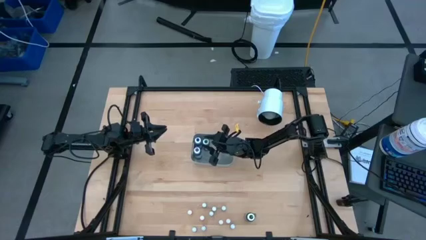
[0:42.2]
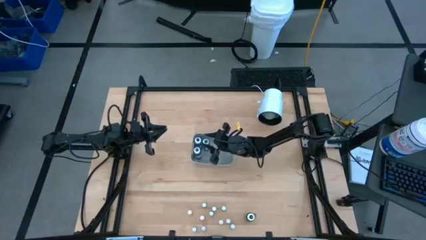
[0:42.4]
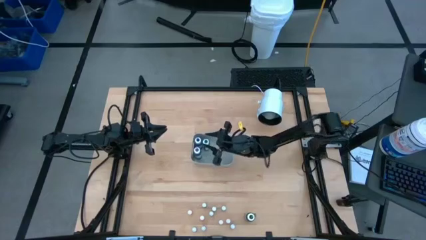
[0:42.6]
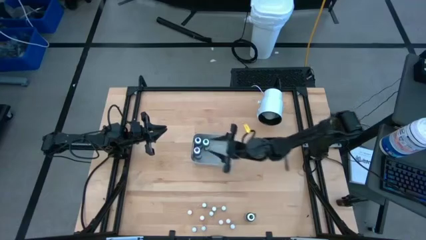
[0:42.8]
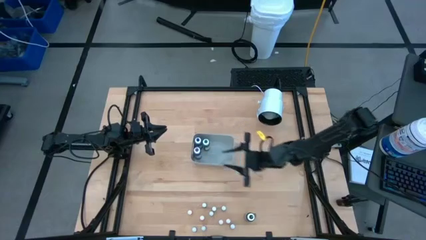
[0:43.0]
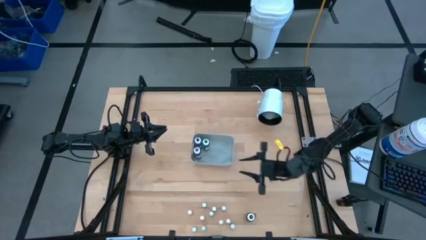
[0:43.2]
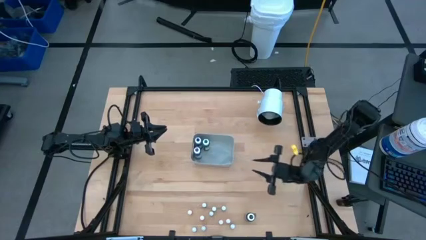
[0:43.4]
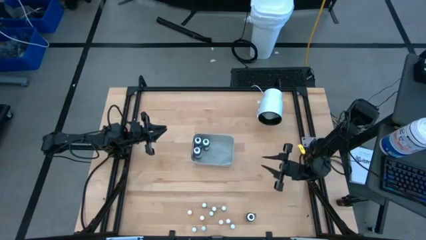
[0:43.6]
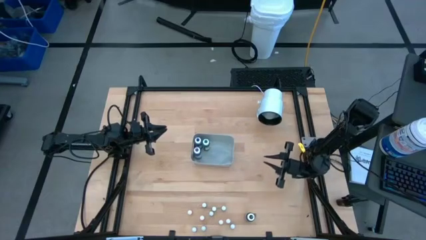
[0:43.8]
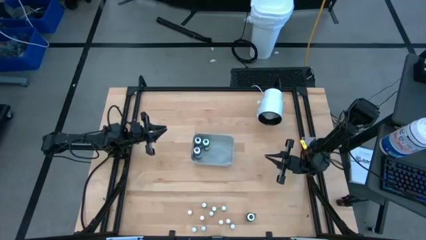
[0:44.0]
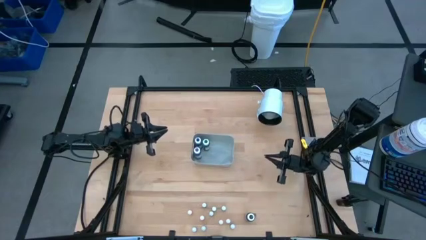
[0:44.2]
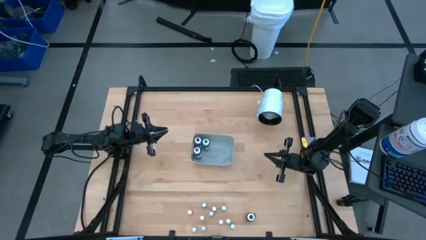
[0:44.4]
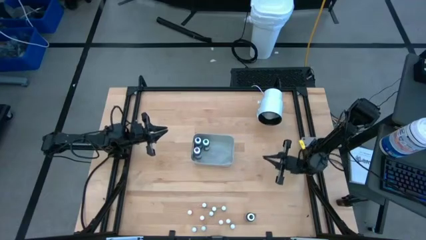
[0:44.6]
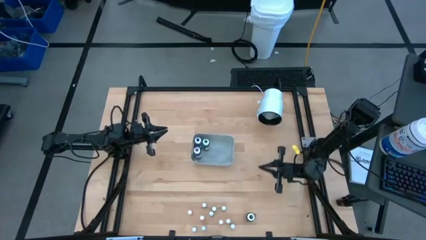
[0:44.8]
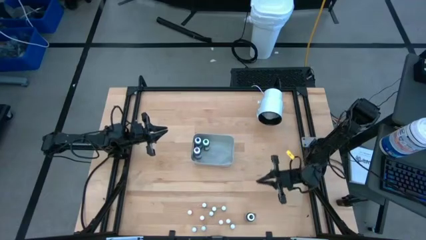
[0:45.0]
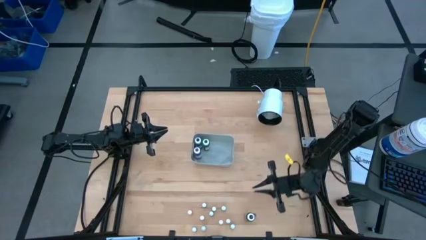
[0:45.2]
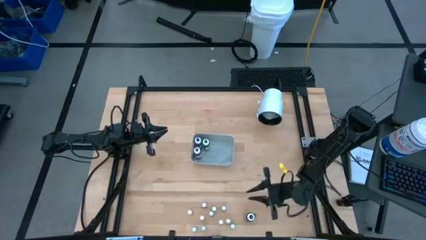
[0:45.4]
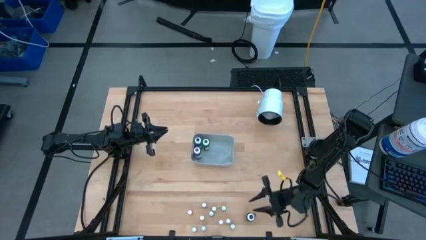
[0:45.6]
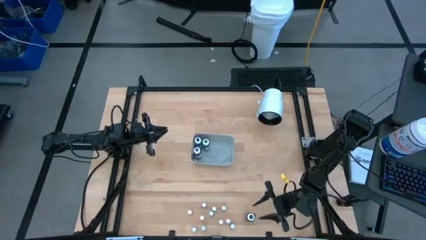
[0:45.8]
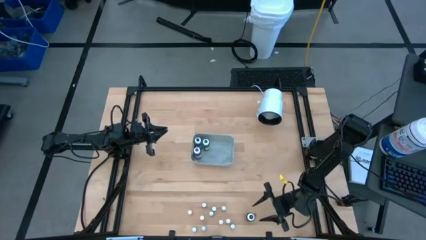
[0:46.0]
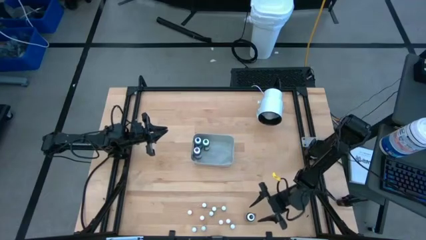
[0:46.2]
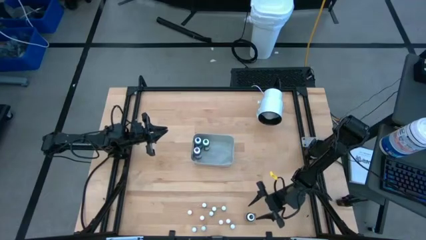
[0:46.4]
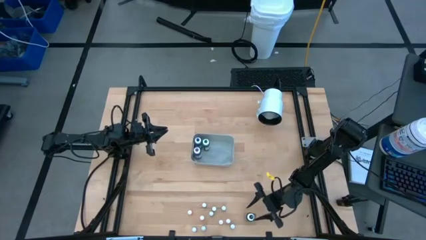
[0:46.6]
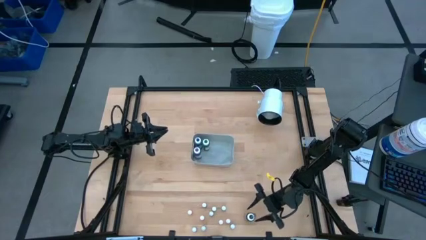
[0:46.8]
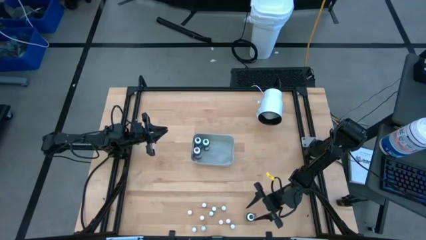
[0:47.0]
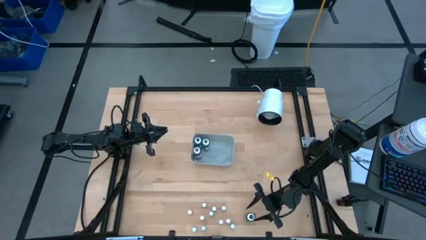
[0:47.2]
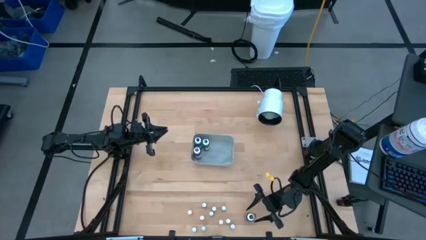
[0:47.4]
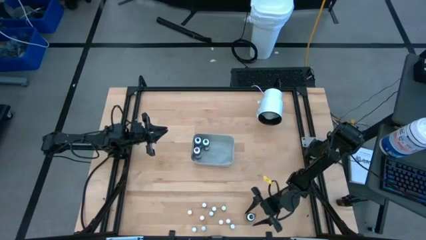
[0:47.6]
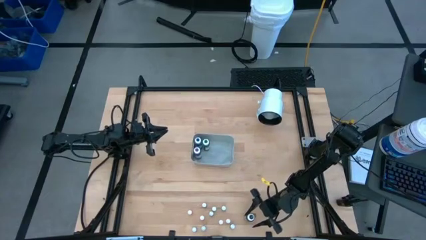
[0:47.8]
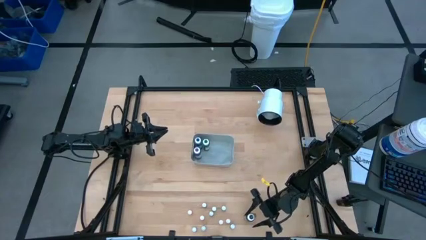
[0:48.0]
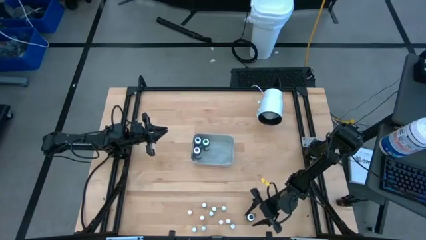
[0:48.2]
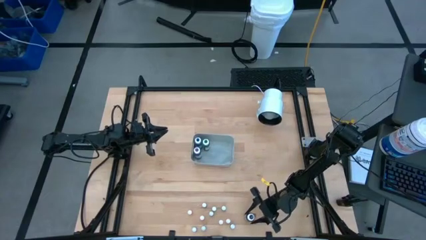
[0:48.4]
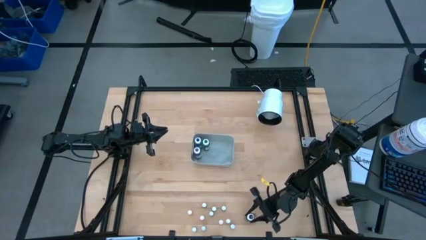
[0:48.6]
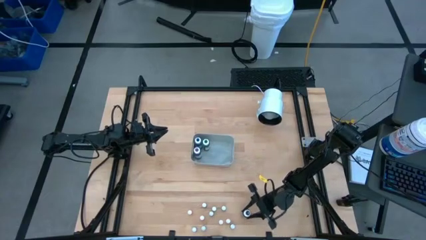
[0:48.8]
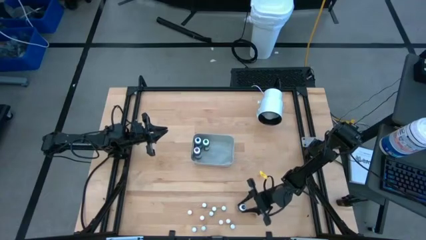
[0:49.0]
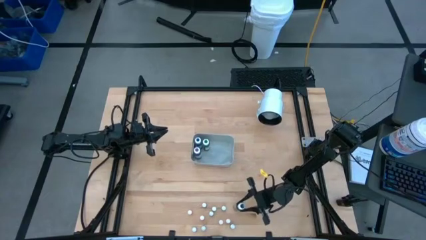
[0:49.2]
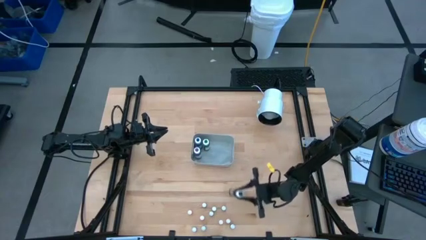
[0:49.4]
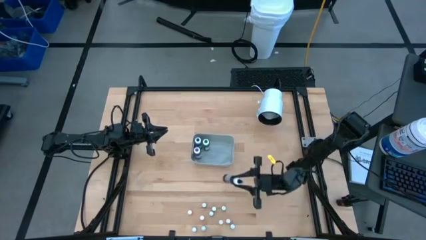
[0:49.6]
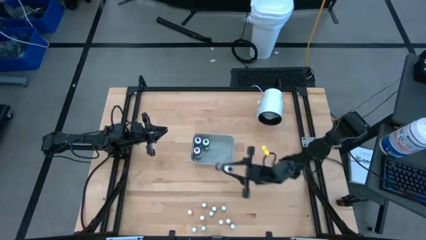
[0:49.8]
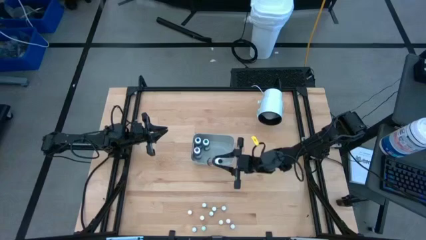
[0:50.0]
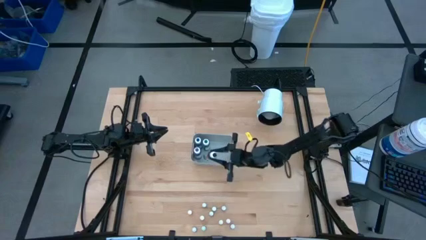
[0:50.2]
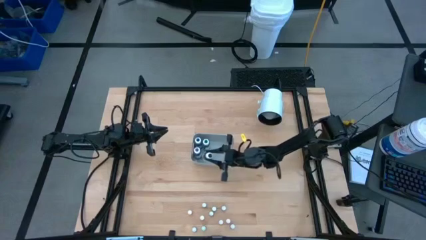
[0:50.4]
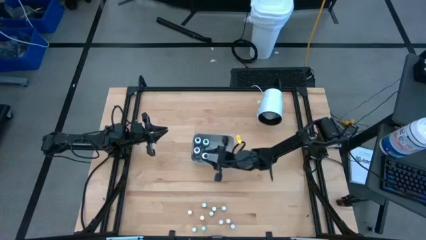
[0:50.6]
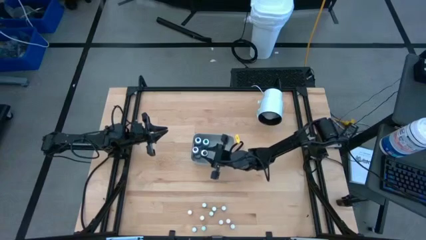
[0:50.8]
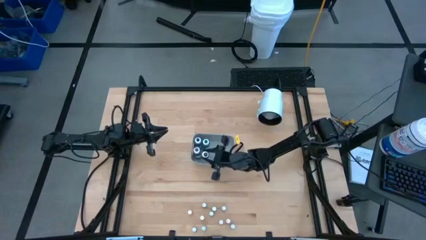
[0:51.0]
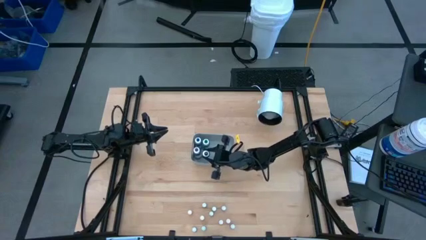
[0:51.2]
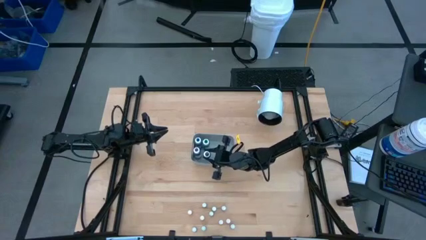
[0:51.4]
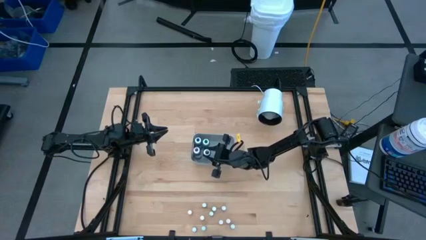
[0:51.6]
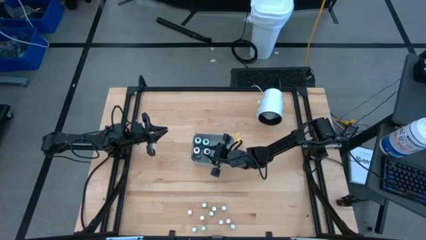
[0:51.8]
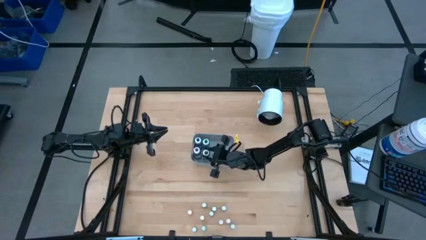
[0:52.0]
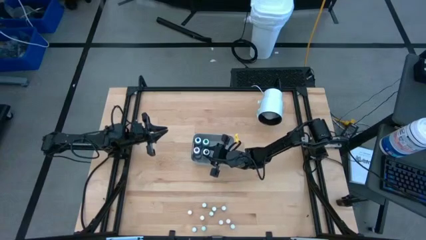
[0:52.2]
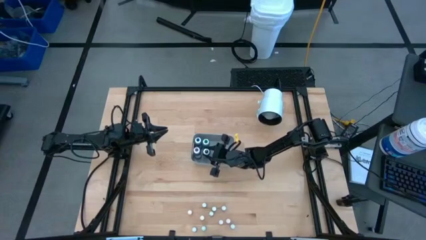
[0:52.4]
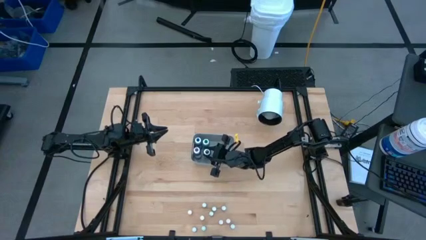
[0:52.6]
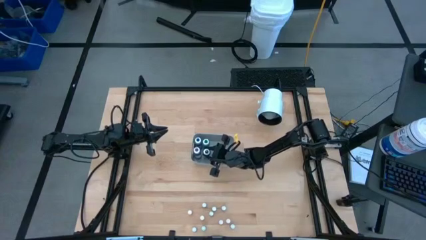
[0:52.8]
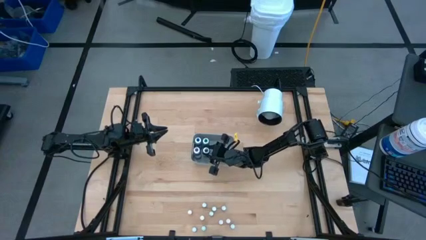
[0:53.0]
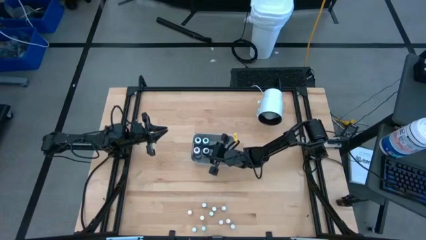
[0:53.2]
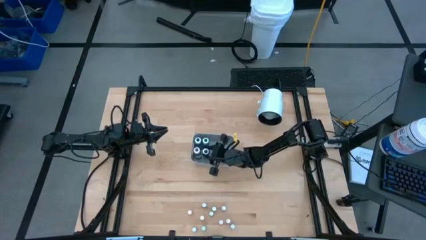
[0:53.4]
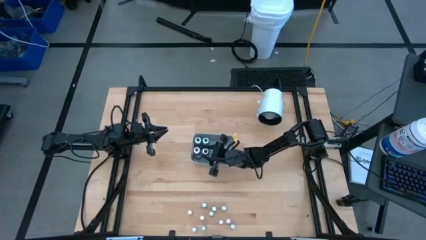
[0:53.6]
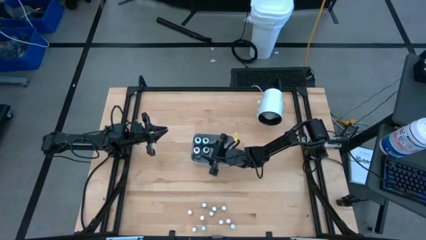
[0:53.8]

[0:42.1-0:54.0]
Task: Pick & Place food coloring
Put the black food coloring bottle into the gray bin
